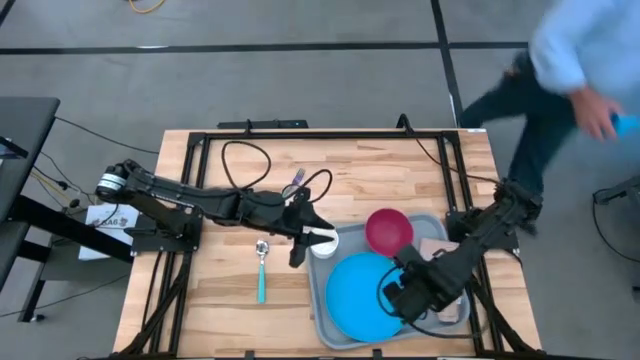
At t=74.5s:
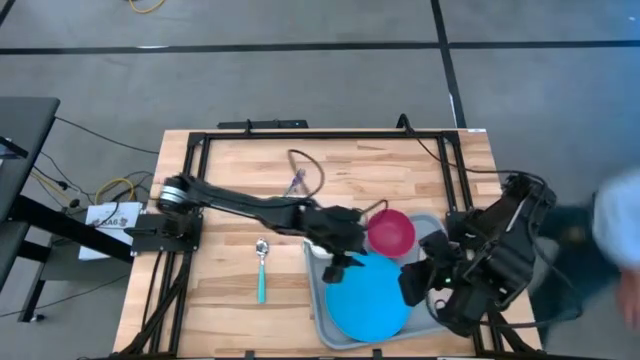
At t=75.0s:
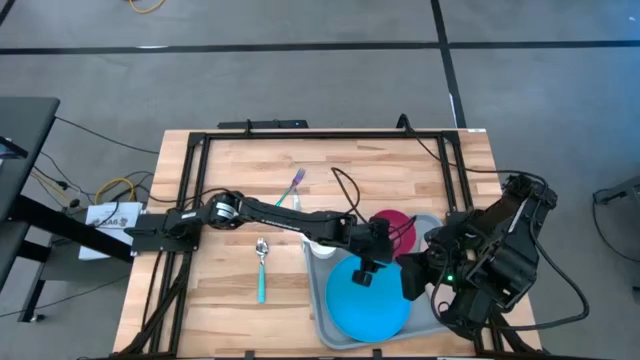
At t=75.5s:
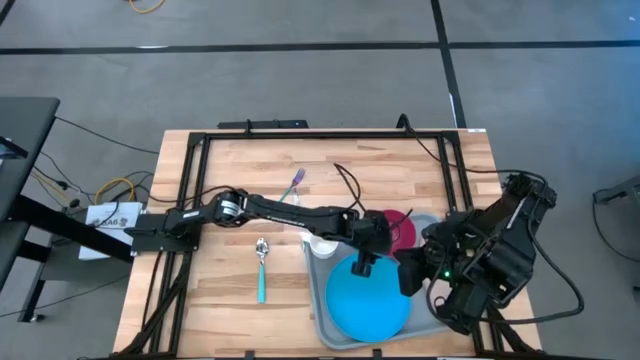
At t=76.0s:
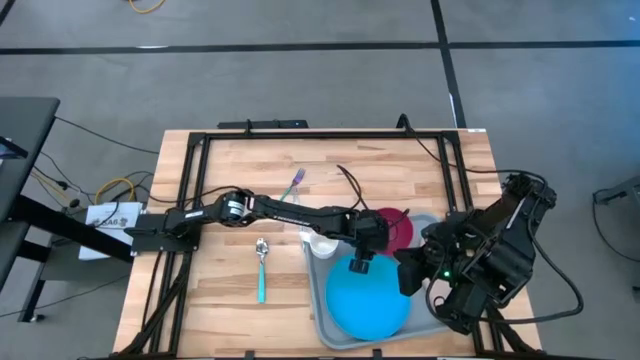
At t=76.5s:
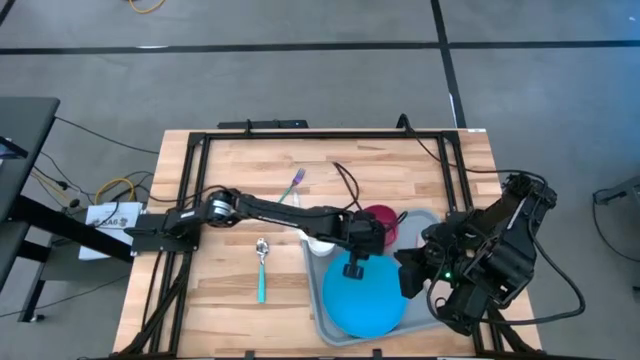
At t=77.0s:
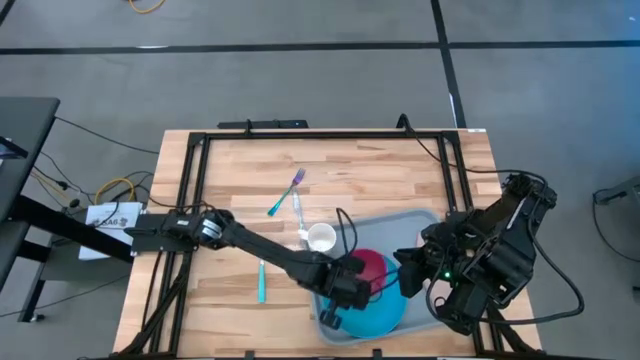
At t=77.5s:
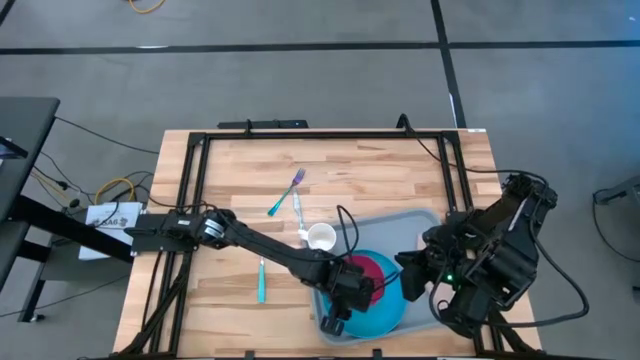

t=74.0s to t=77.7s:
Task: Set up tray
Put the red bowl on the blue plate

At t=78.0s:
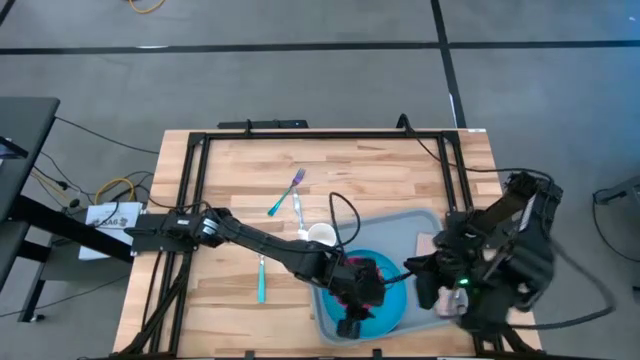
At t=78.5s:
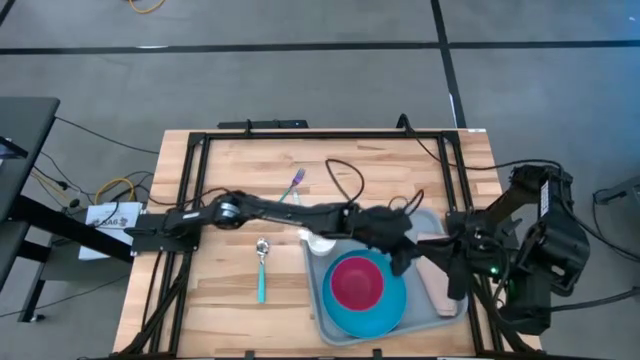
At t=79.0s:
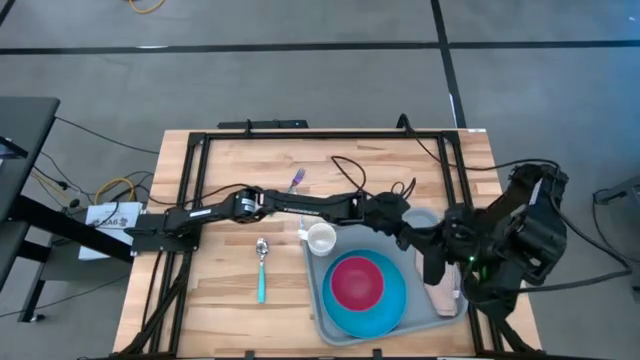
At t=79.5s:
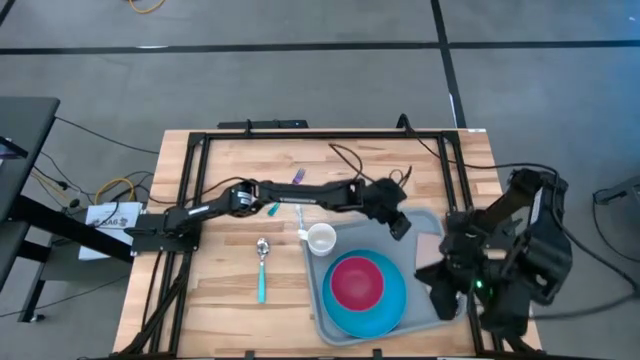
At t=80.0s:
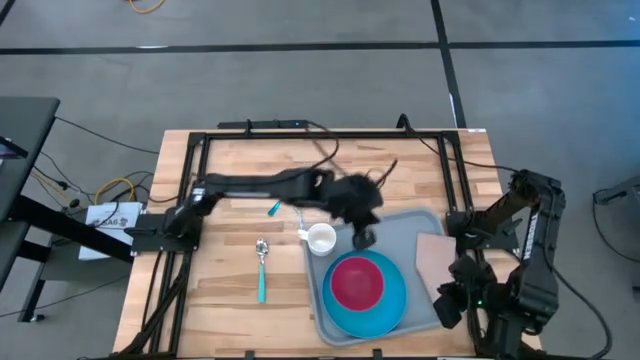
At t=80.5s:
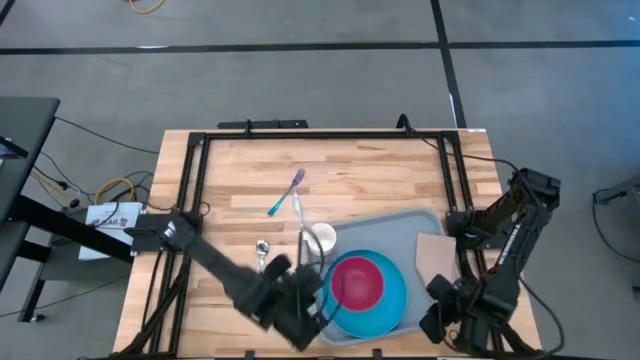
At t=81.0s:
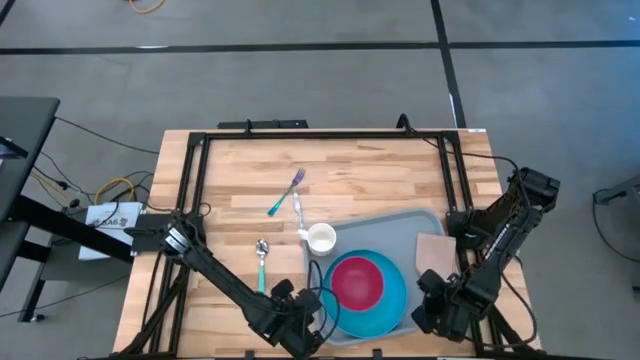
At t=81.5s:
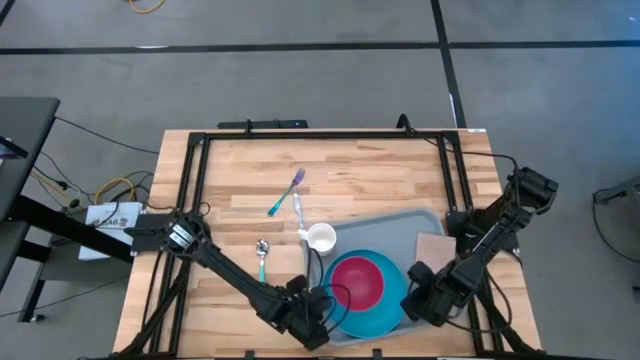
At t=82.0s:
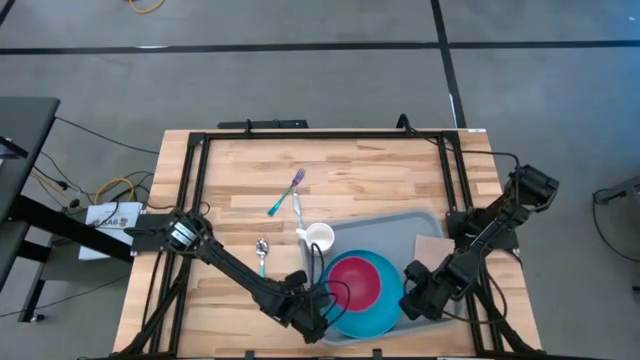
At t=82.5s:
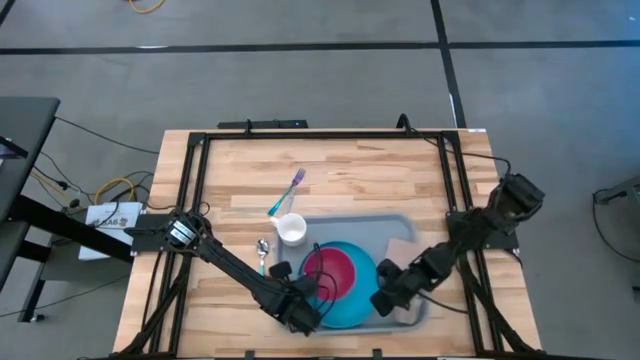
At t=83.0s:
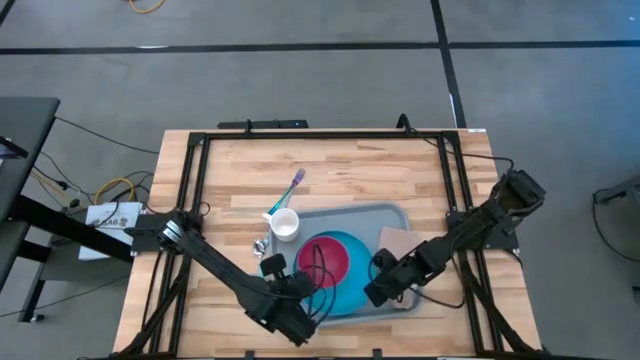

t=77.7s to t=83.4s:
Move the gray tray to the center of the table

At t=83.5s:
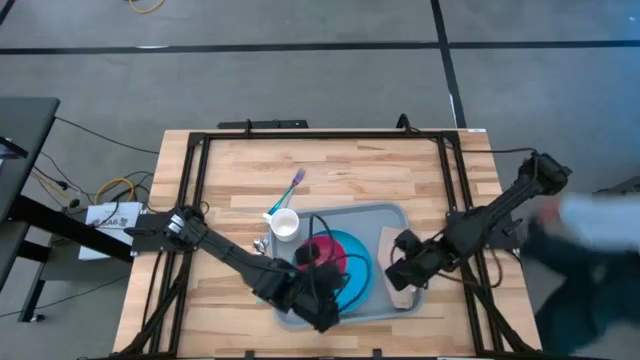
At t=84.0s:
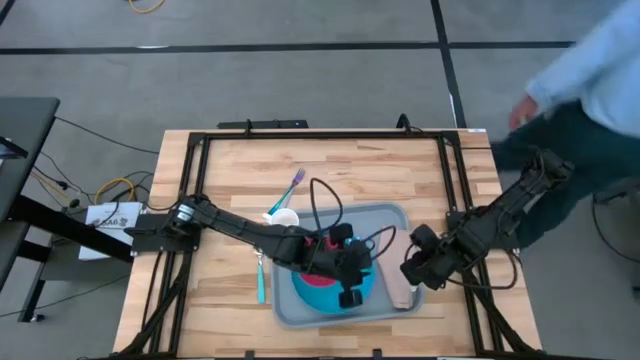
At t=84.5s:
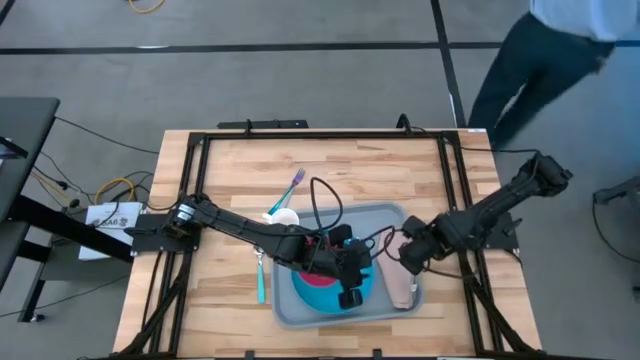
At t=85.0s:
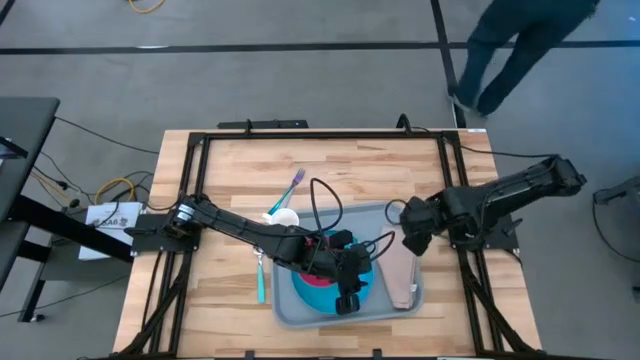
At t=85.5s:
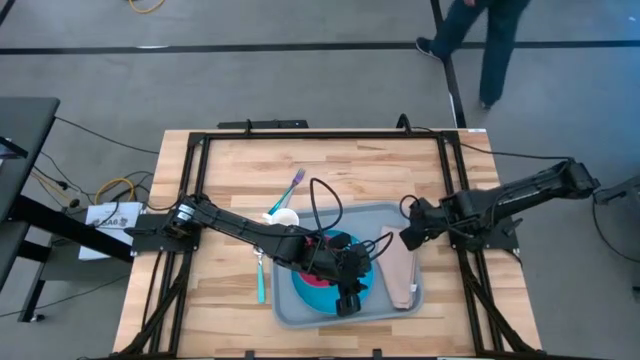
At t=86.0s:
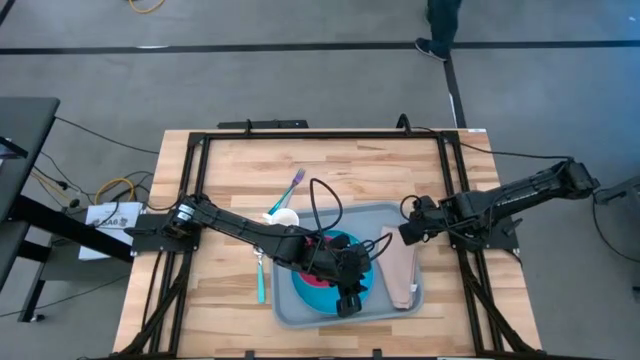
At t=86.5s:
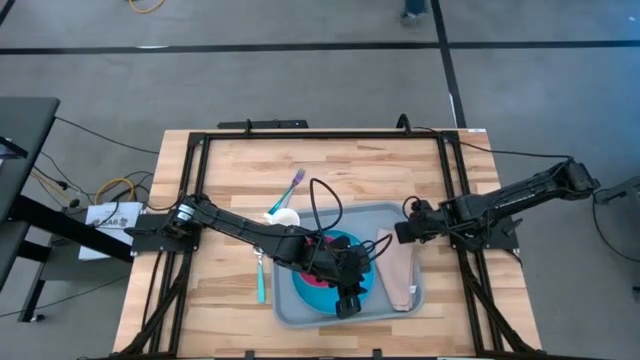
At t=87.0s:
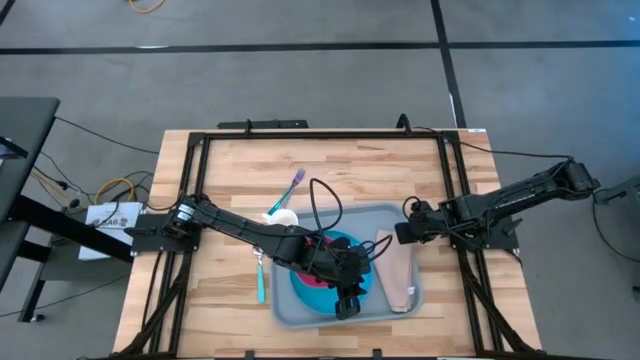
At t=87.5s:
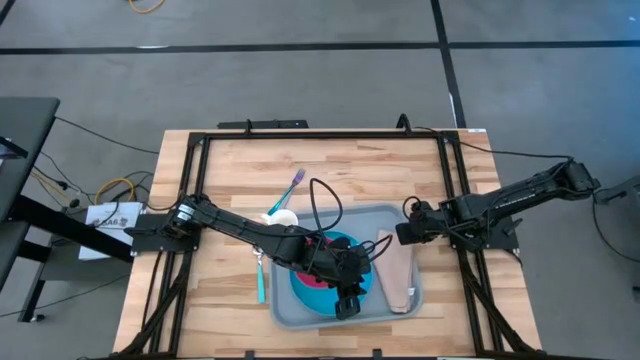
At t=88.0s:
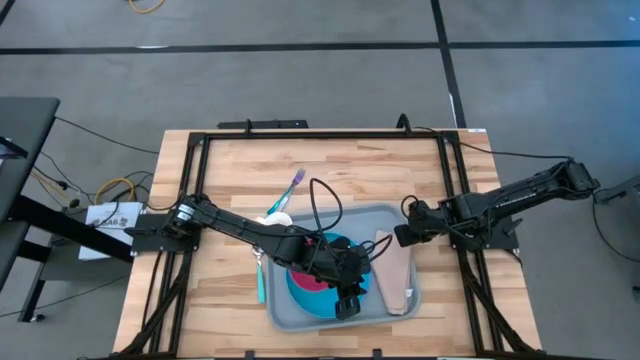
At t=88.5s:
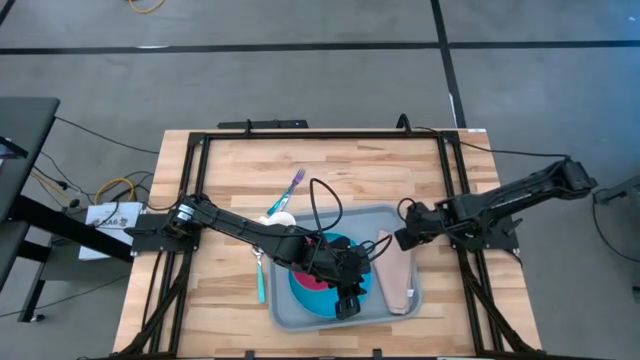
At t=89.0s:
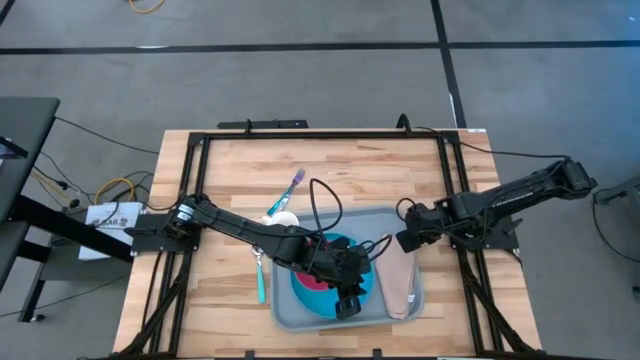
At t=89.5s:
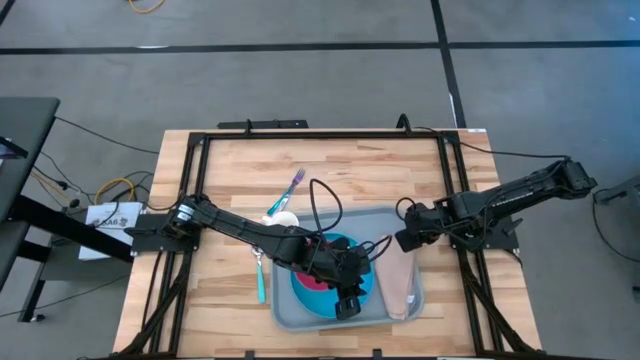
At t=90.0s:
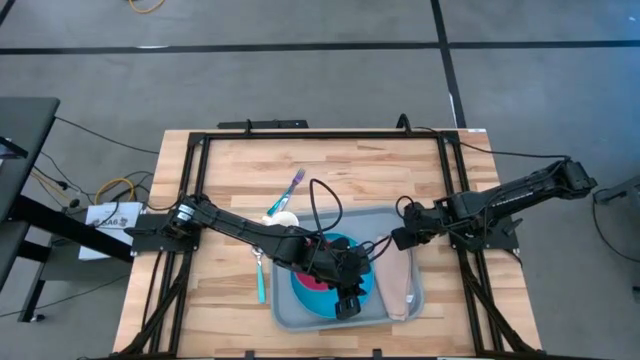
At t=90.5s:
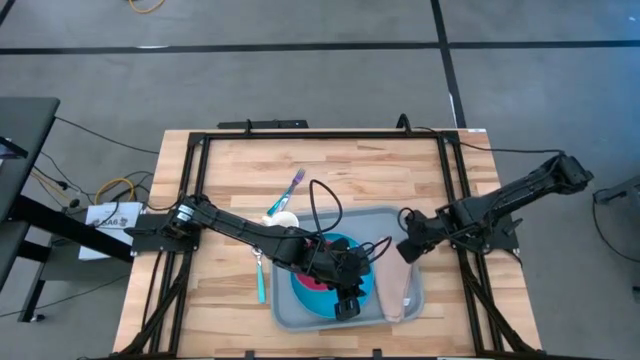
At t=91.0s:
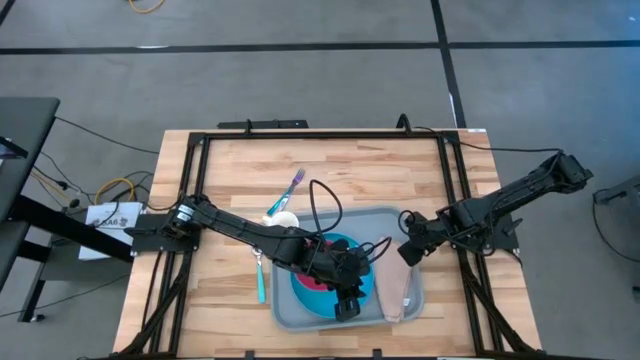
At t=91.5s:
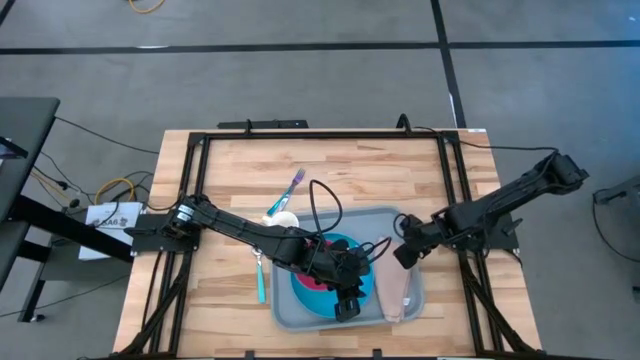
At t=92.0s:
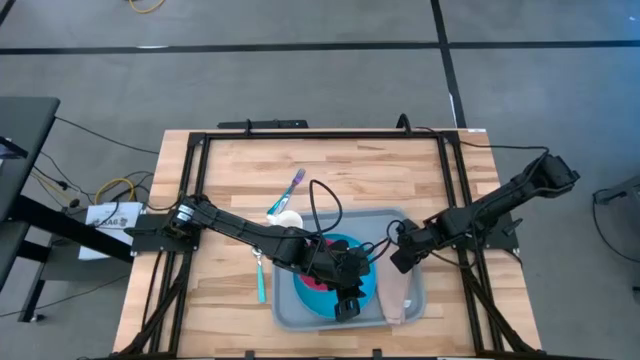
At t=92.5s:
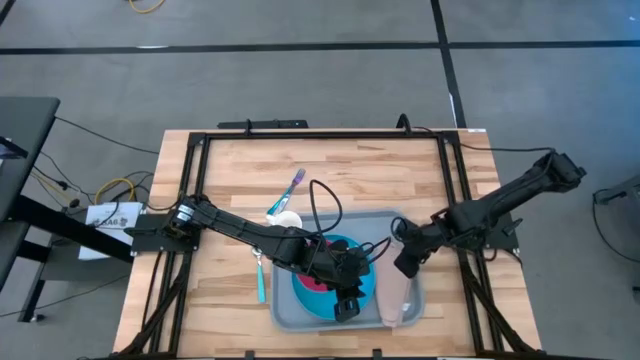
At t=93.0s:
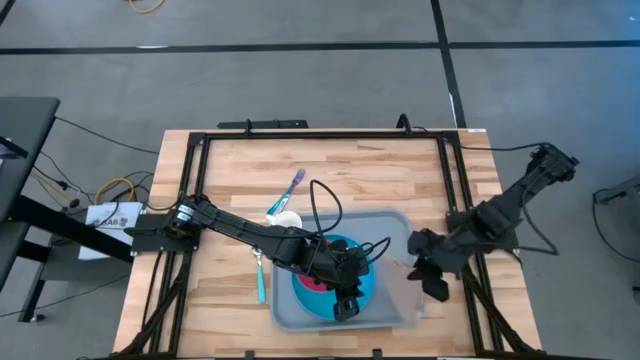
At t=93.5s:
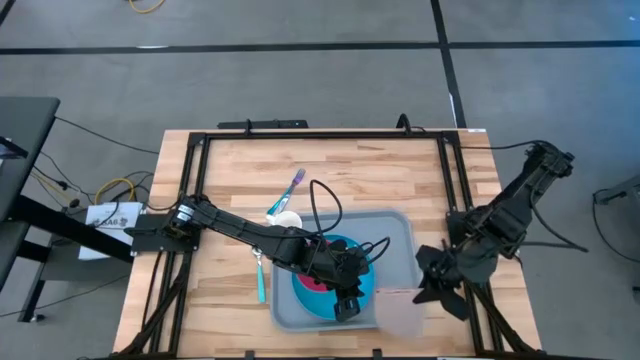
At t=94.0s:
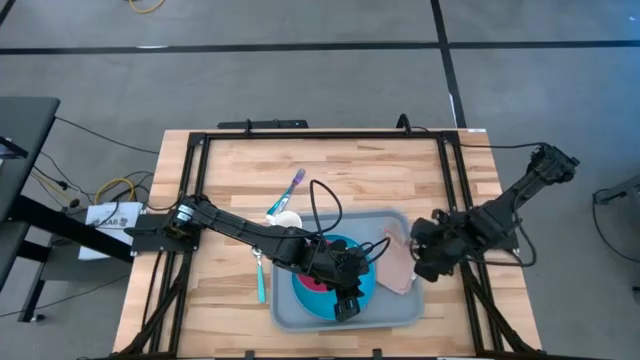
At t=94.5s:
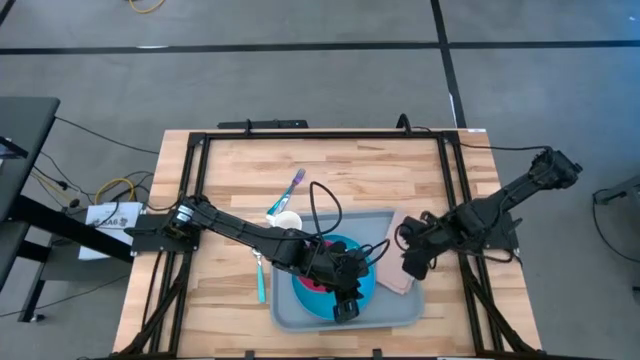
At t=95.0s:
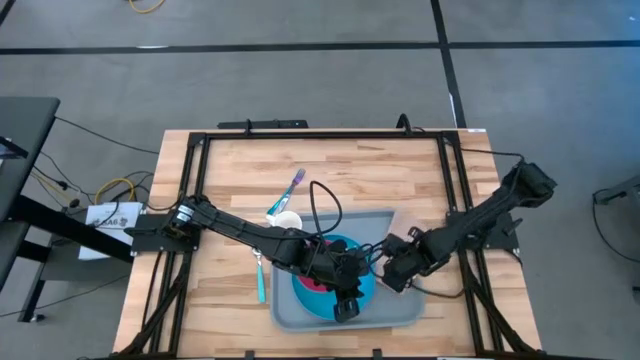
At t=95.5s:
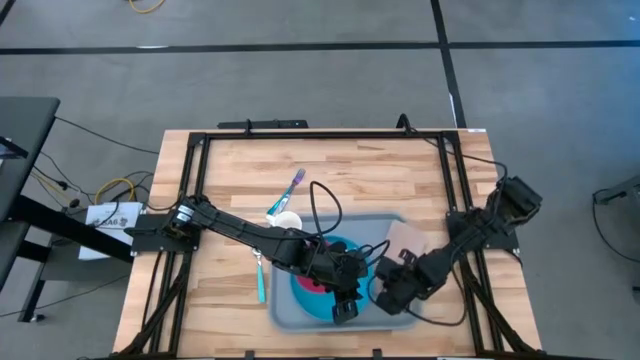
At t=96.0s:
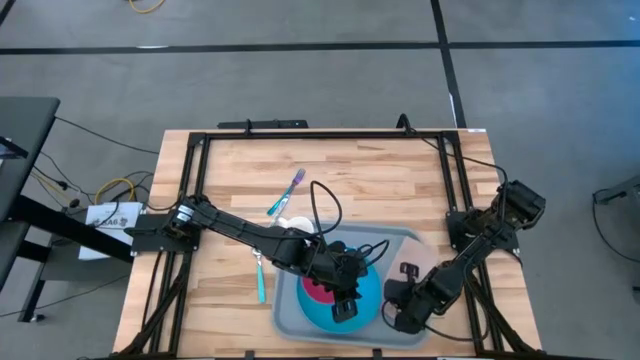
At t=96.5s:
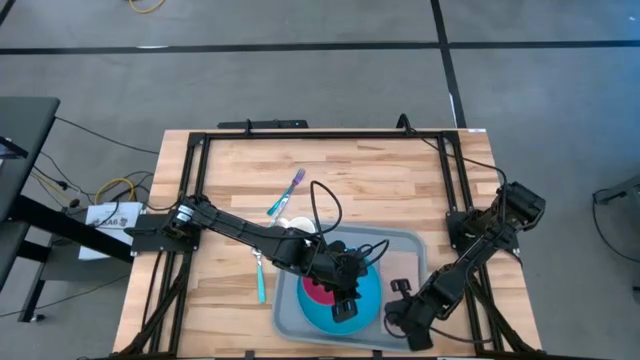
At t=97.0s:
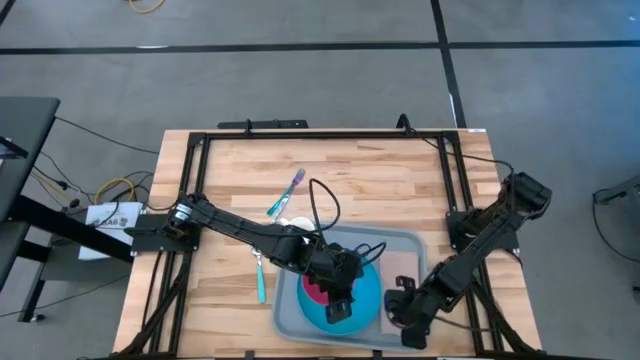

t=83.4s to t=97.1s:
Put the brown napkin on the gray tray
